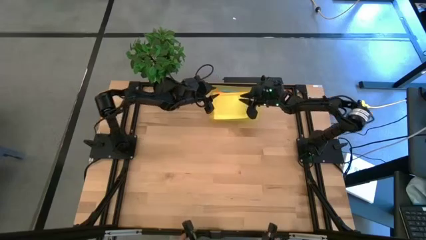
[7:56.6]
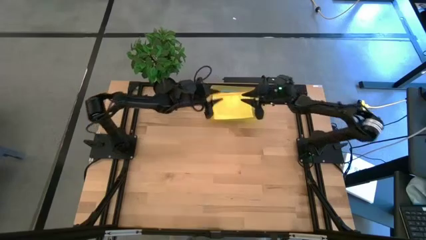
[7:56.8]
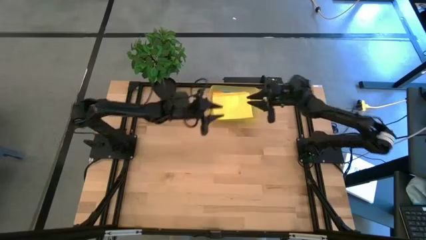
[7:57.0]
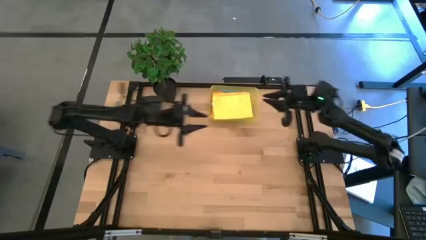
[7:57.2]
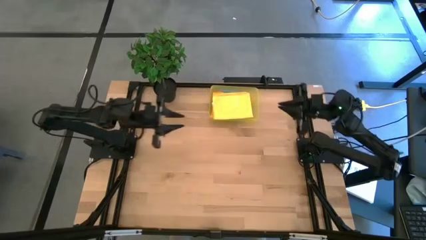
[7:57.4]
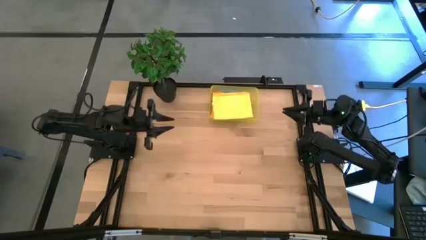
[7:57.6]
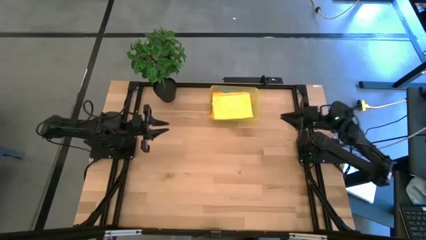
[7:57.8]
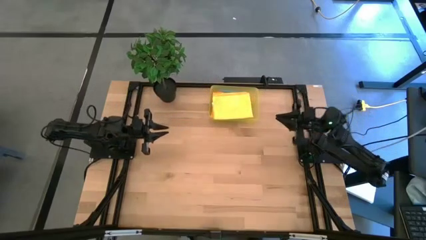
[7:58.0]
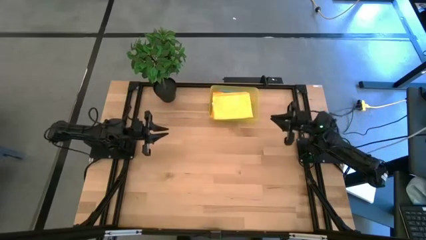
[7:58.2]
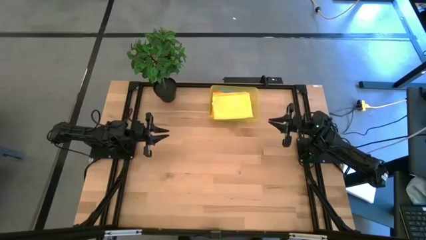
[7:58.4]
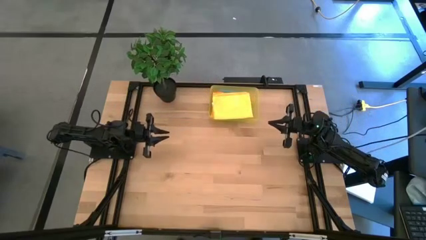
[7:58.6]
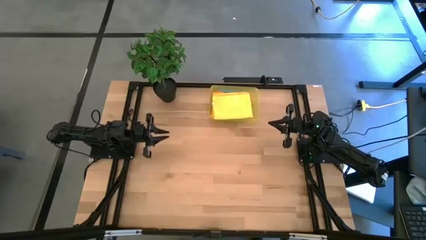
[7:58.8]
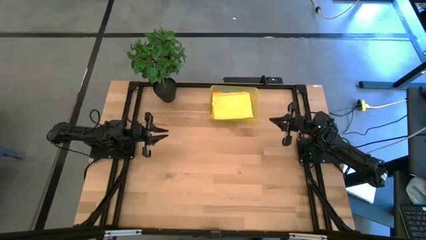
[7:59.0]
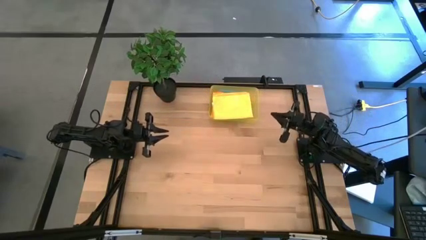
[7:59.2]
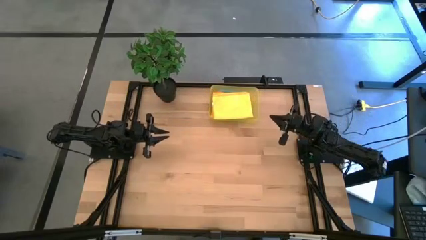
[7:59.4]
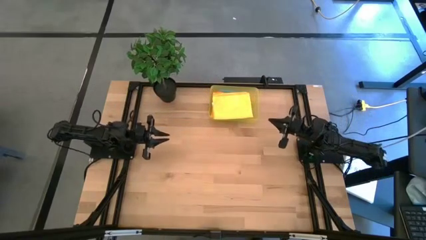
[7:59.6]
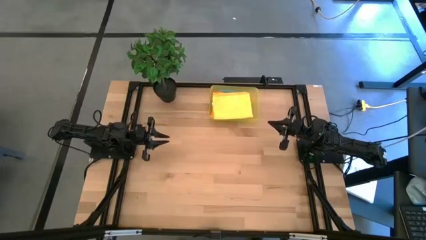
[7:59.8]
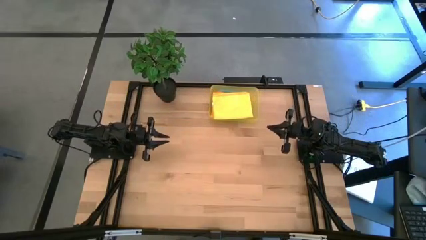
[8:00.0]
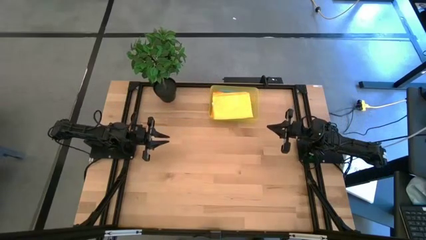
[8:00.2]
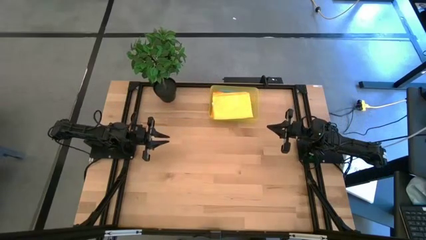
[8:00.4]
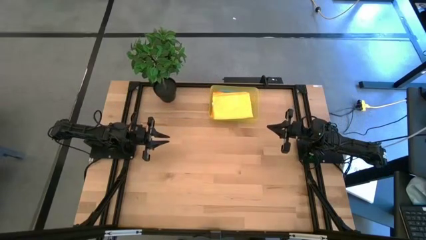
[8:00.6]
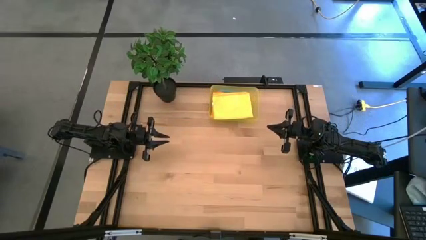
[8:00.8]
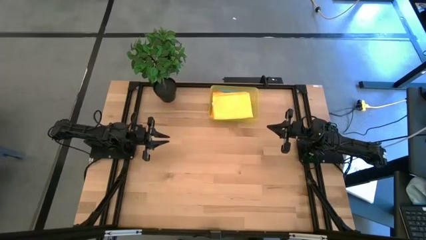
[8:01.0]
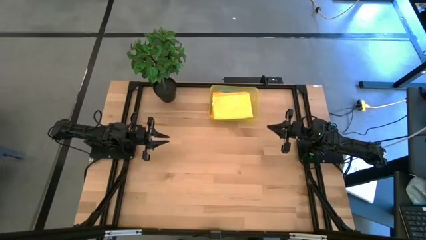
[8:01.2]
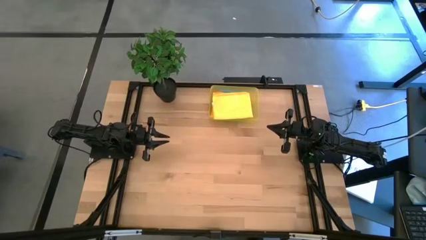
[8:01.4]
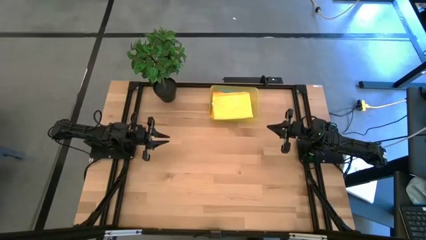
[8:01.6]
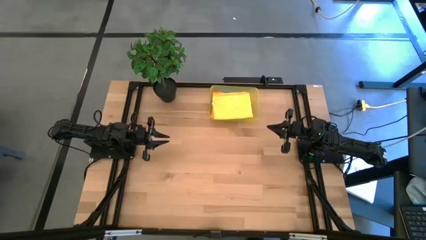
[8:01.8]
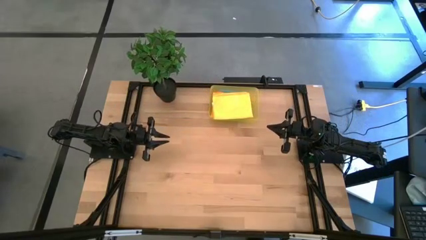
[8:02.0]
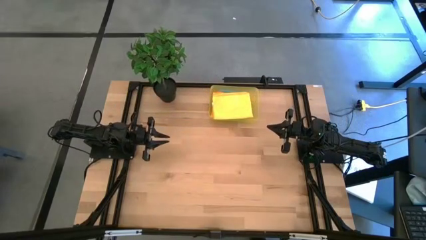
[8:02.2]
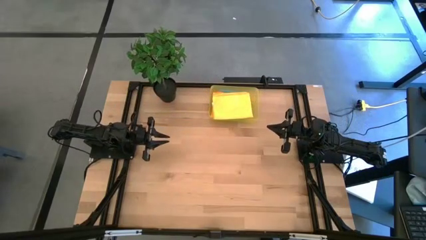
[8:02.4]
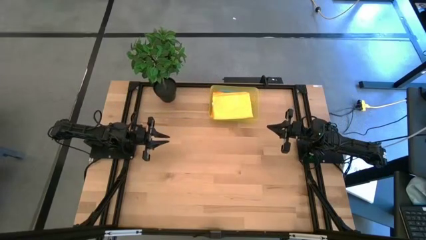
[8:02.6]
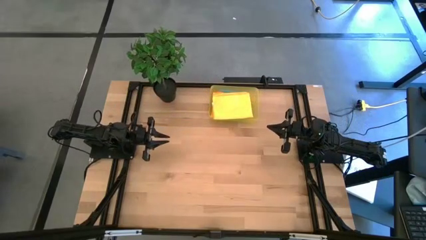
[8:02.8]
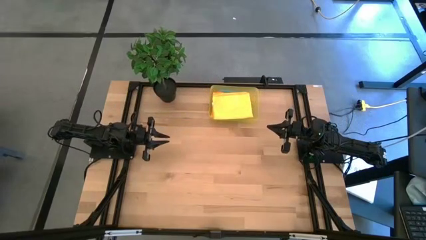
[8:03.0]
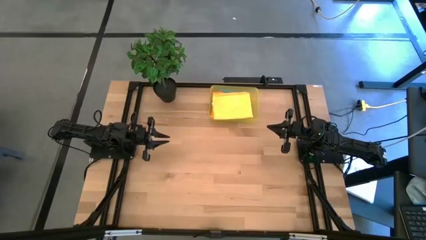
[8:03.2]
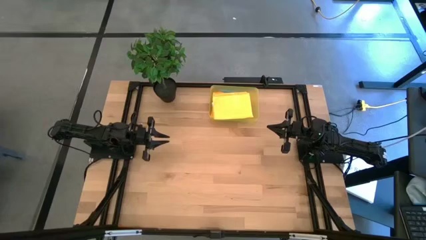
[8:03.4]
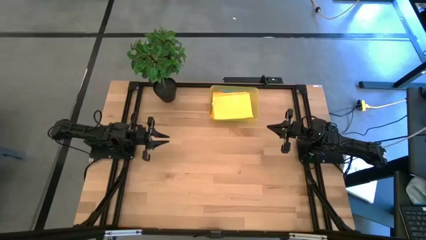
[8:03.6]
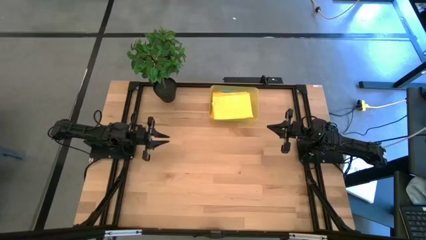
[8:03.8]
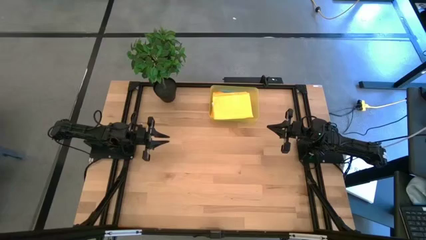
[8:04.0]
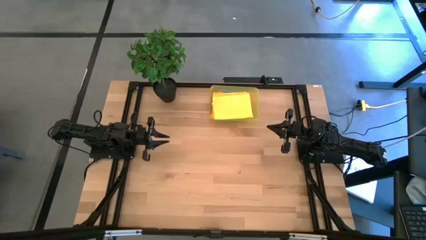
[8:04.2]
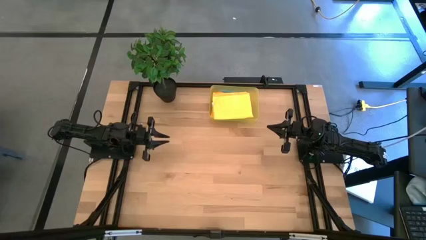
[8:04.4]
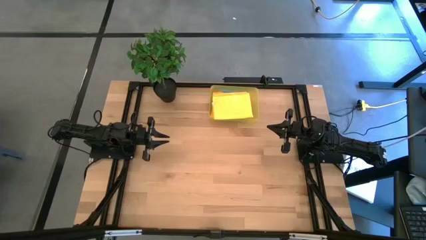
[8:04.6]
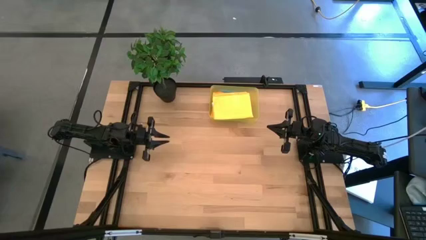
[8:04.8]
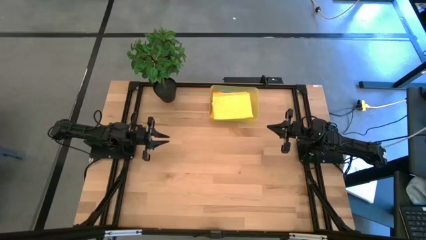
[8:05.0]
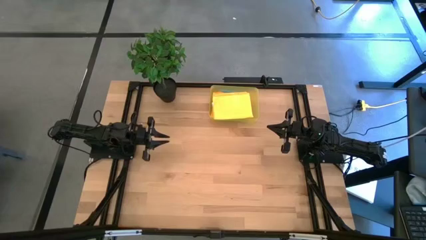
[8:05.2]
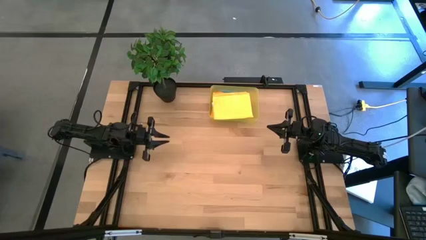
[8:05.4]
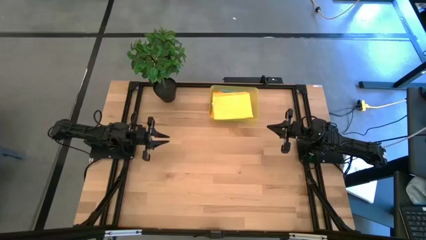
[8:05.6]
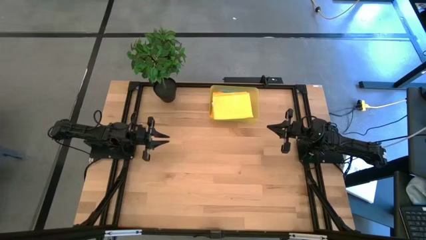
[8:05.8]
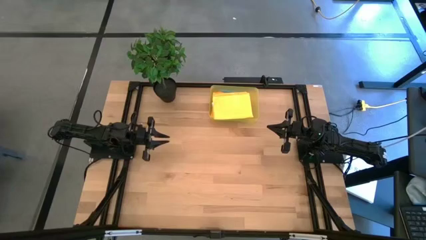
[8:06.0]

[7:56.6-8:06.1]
Task: Fold microfiber towels
Return to Home Position

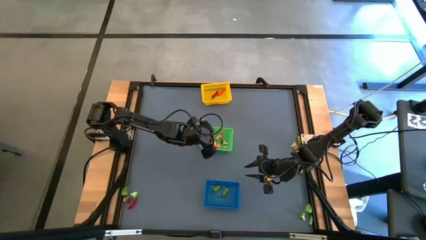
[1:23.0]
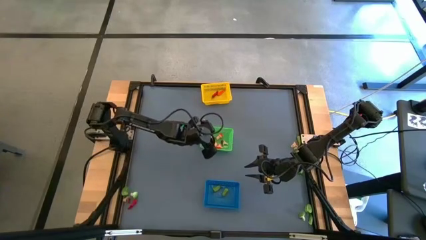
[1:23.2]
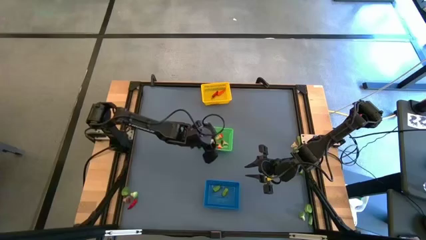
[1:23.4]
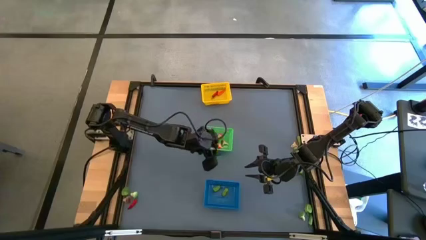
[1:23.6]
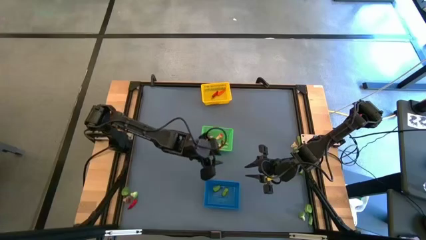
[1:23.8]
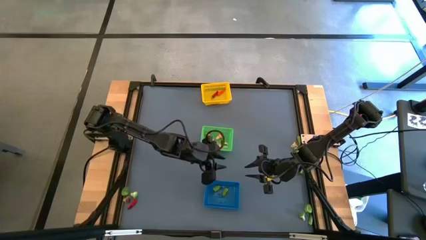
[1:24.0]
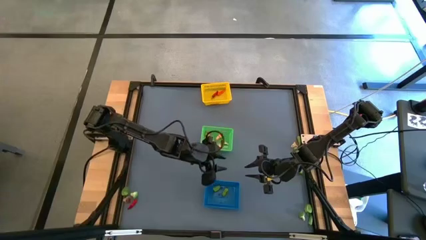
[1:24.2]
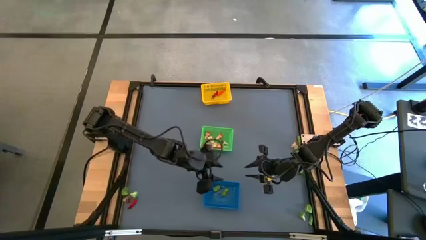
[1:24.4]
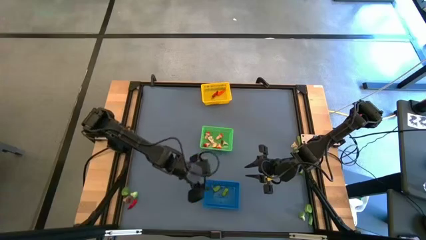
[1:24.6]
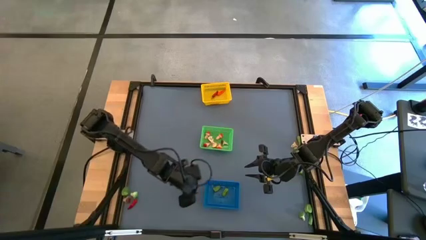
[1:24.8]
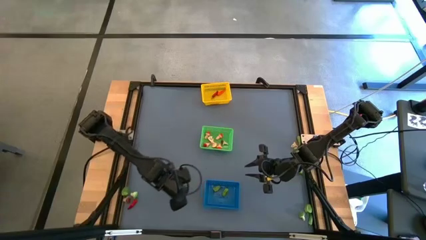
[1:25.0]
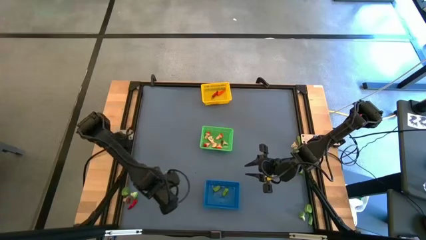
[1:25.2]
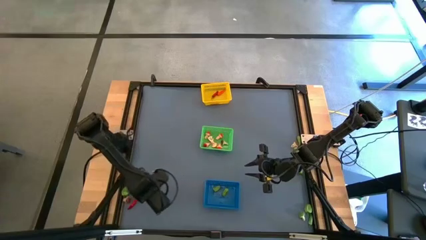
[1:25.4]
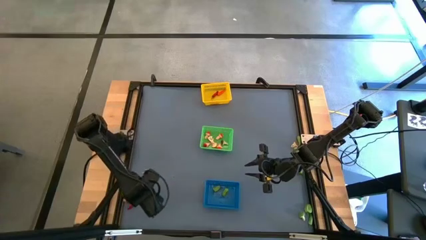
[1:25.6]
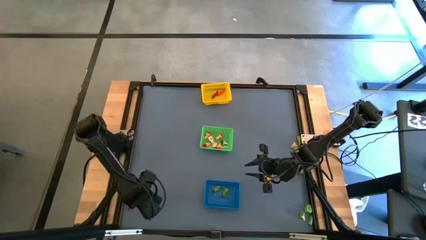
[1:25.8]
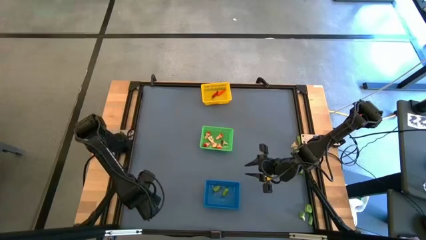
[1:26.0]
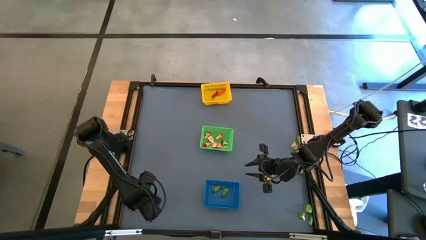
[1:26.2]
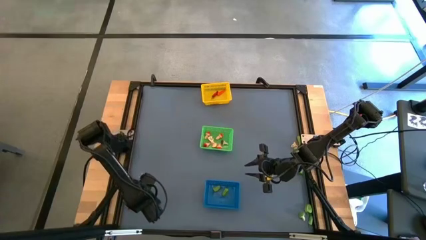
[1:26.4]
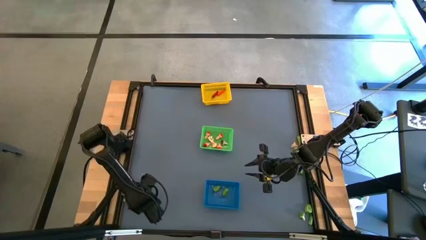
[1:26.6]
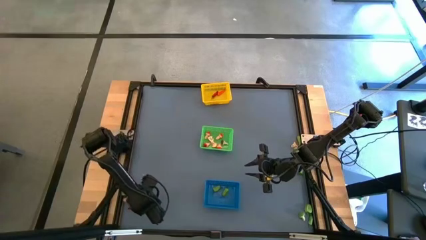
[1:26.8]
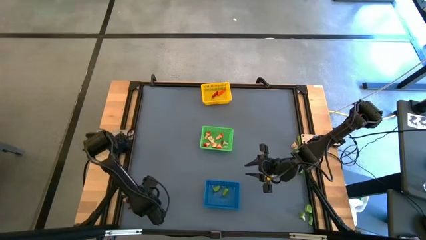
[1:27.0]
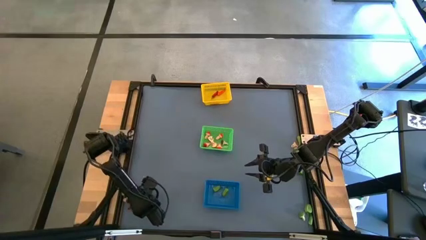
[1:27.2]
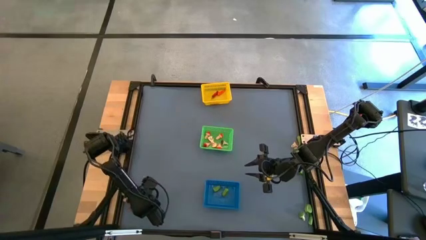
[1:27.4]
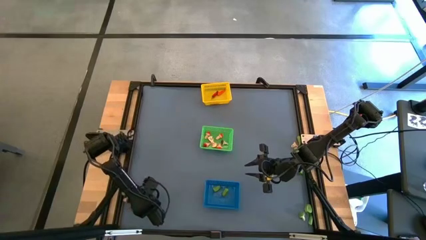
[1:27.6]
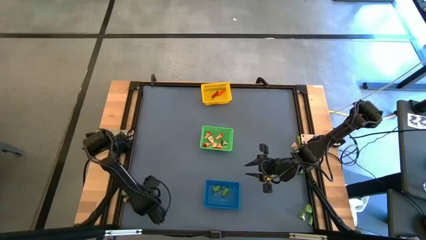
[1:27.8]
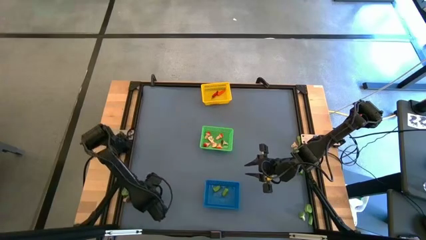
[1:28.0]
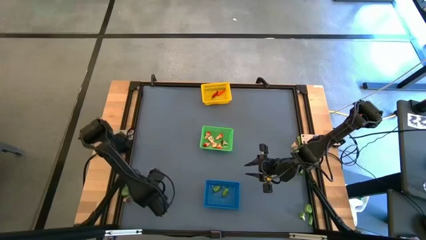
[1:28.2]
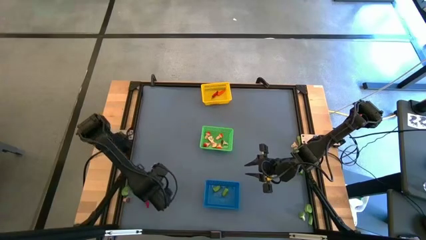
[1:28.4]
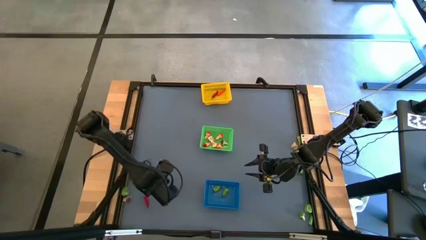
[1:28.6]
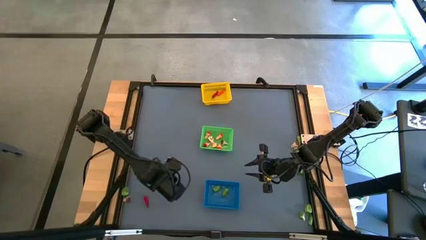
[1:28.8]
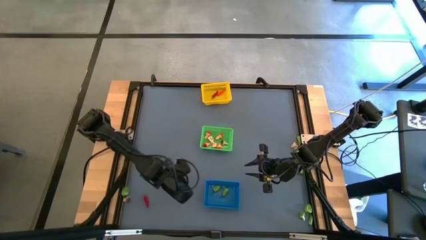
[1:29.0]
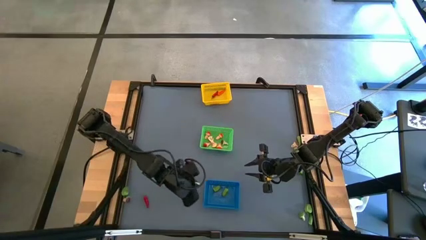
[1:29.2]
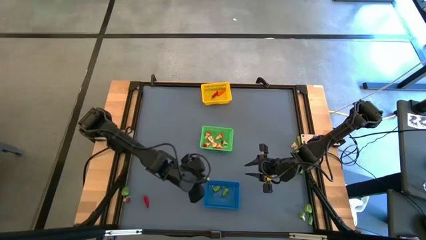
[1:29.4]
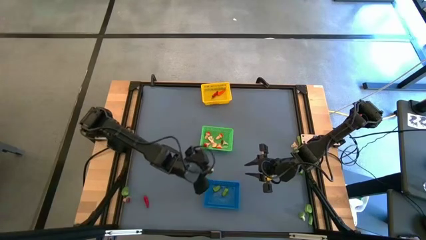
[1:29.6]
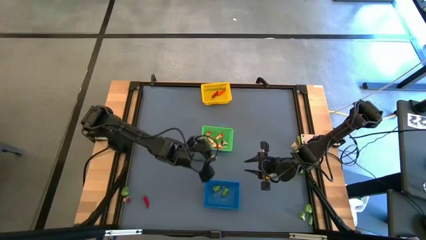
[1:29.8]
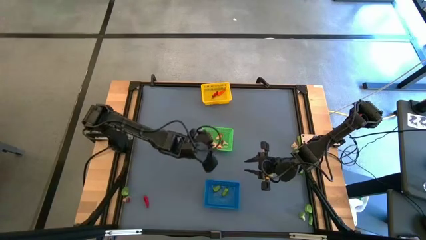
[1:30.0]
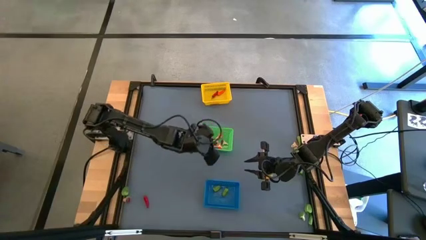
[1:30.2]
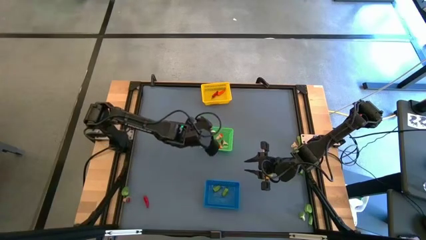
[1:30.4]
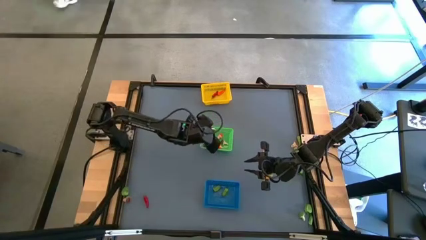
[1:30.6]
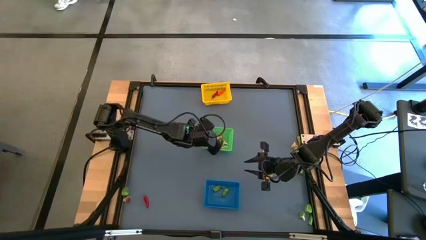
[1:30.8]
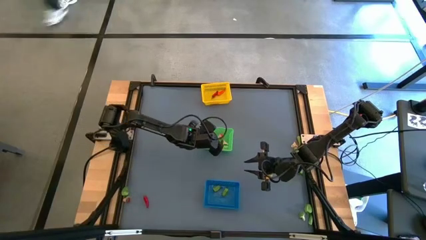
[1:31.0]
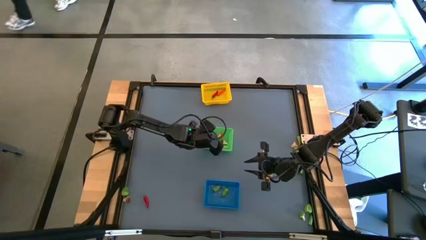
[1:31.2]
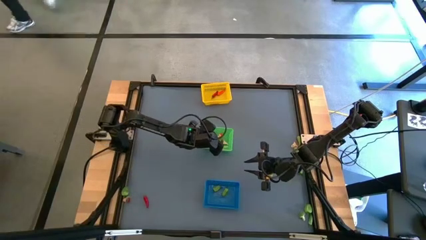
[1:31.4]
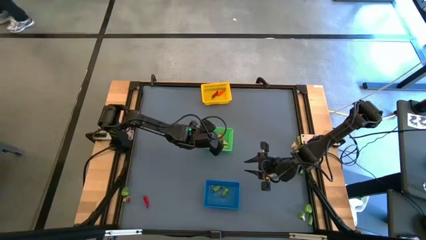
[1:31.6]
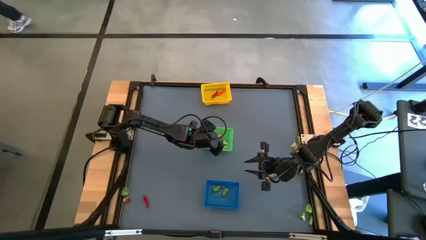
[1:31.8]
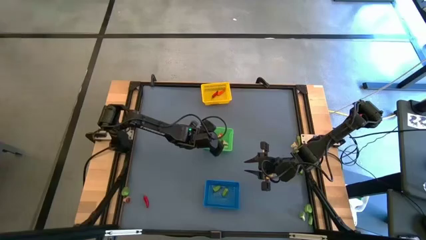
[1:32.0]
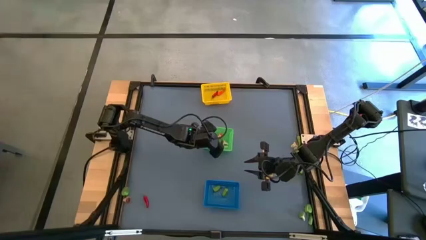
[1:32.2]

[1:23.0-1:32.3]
Task: Sort produce into baskets
Put the green mushroom into the green bin
